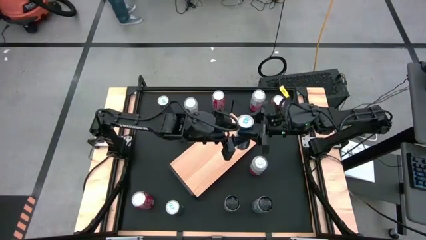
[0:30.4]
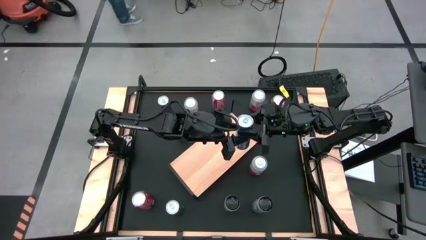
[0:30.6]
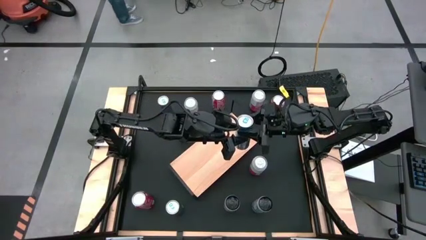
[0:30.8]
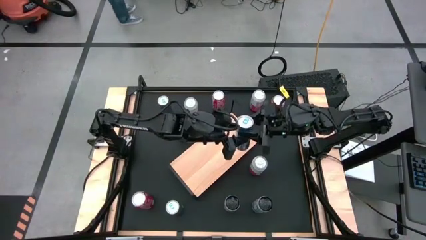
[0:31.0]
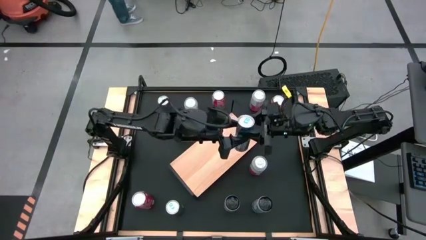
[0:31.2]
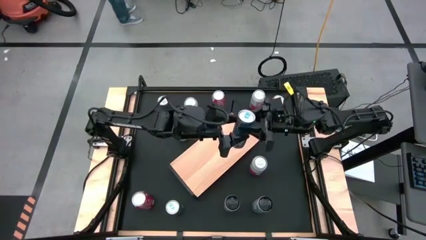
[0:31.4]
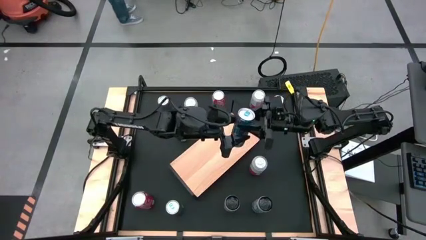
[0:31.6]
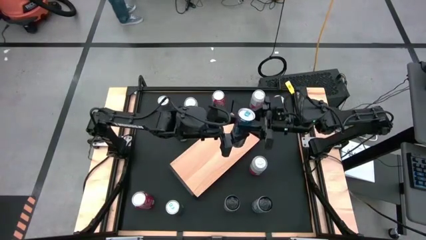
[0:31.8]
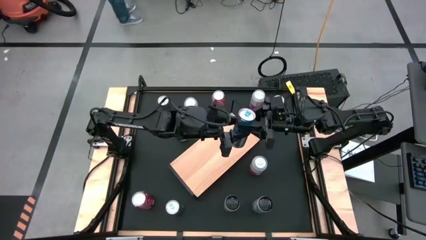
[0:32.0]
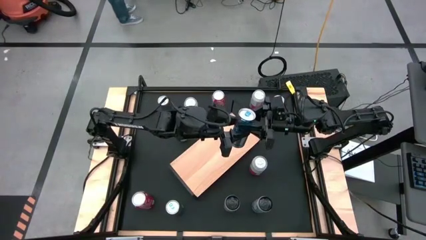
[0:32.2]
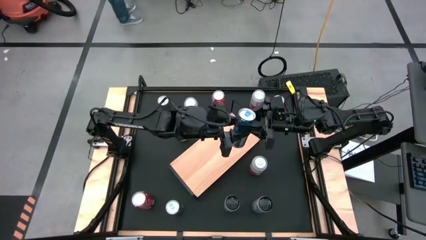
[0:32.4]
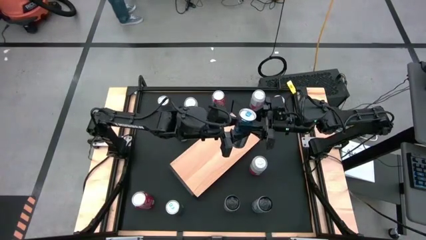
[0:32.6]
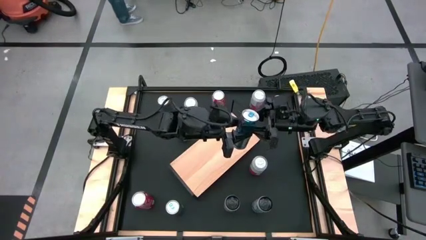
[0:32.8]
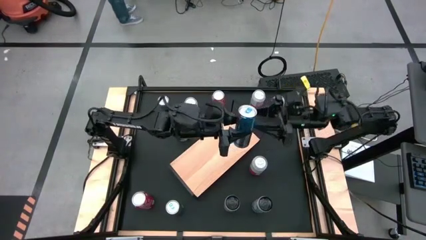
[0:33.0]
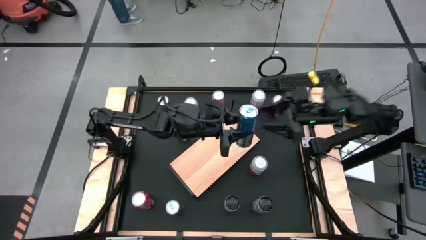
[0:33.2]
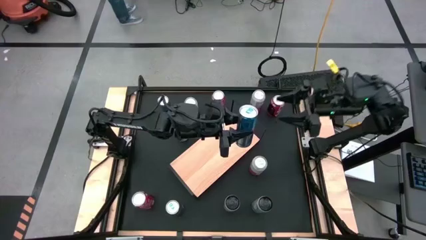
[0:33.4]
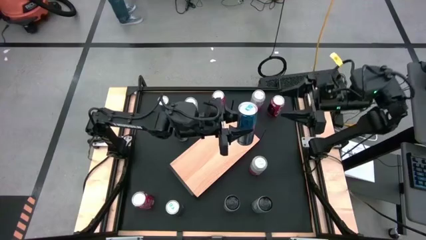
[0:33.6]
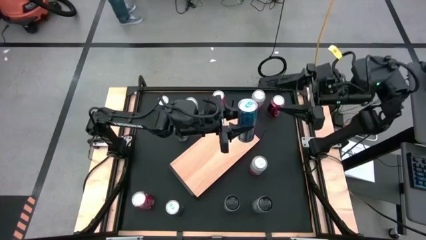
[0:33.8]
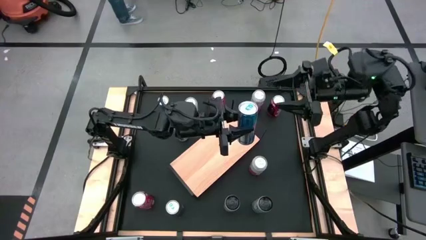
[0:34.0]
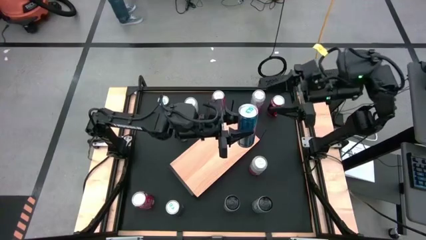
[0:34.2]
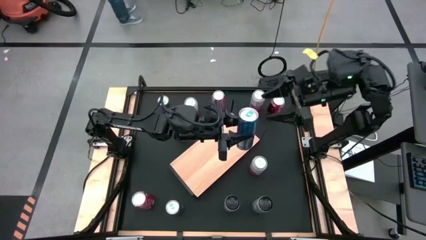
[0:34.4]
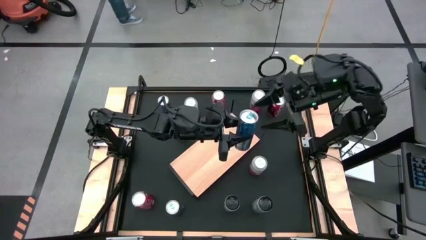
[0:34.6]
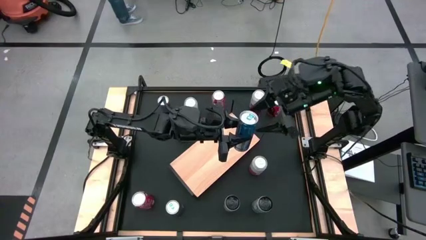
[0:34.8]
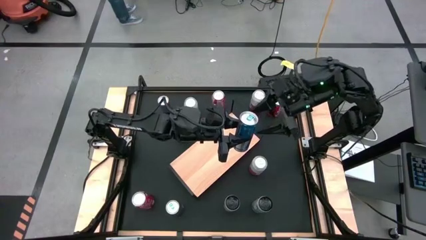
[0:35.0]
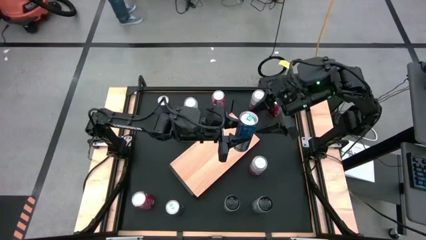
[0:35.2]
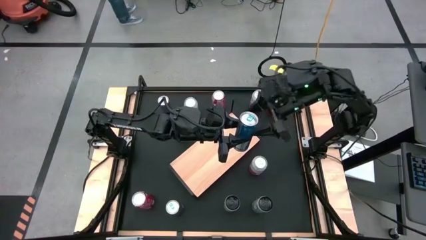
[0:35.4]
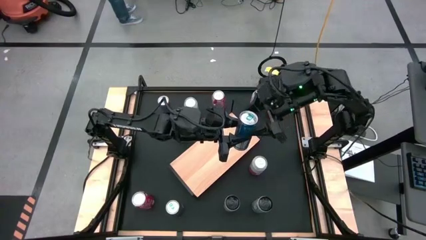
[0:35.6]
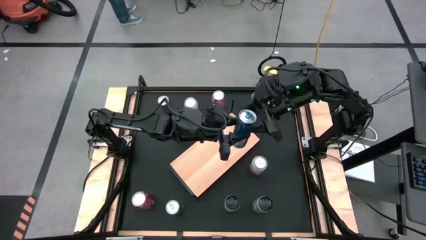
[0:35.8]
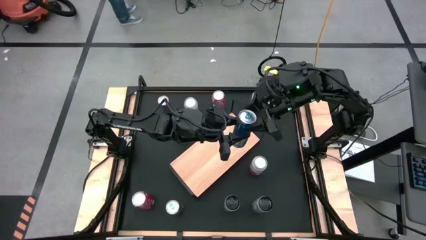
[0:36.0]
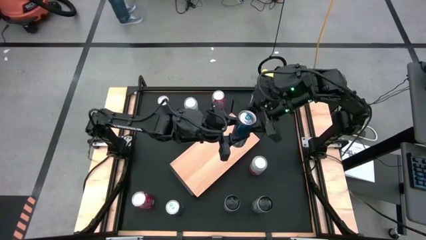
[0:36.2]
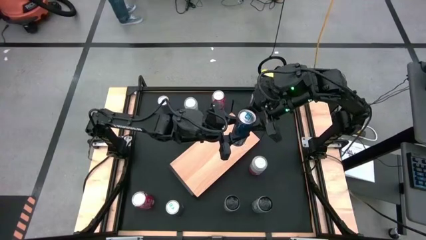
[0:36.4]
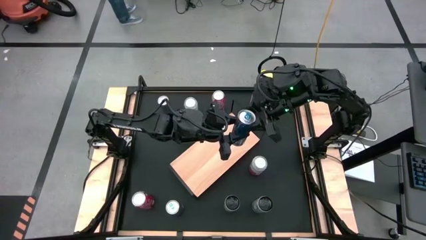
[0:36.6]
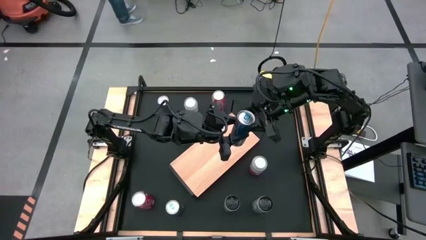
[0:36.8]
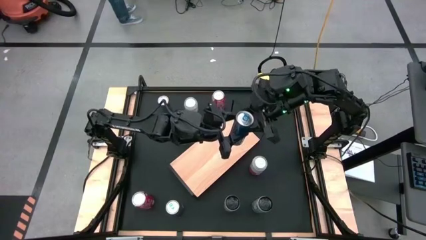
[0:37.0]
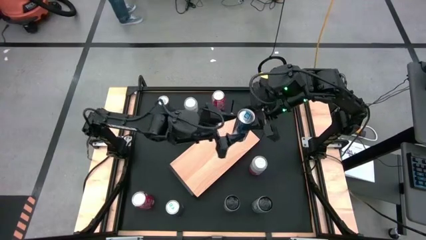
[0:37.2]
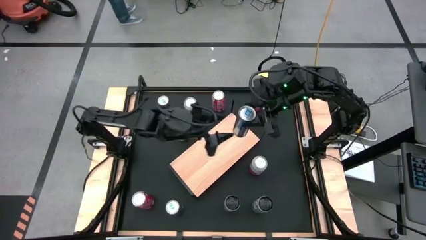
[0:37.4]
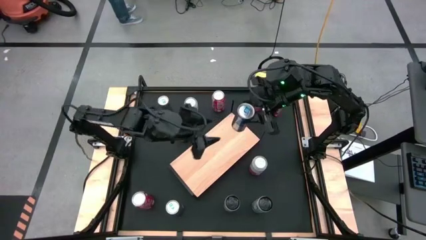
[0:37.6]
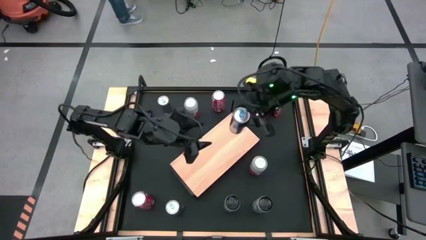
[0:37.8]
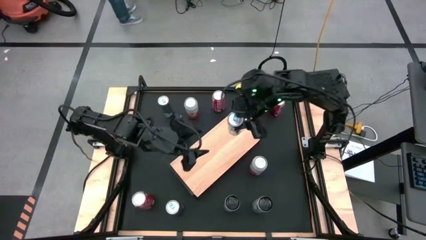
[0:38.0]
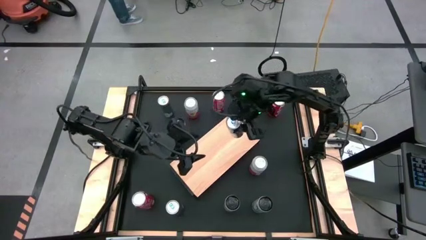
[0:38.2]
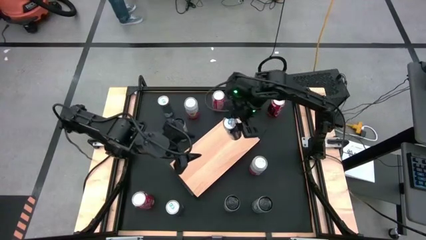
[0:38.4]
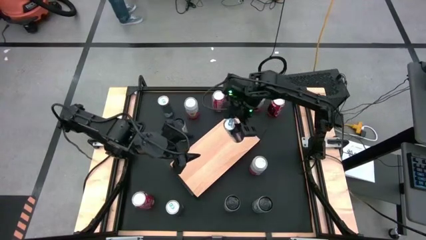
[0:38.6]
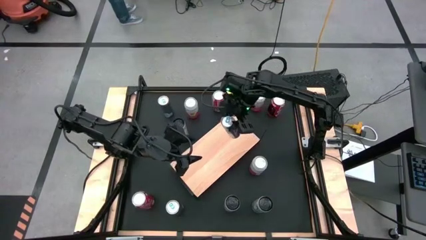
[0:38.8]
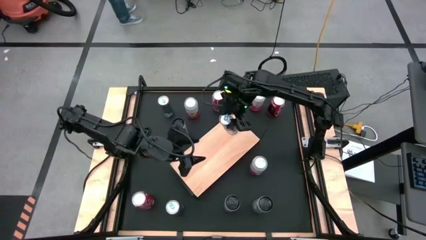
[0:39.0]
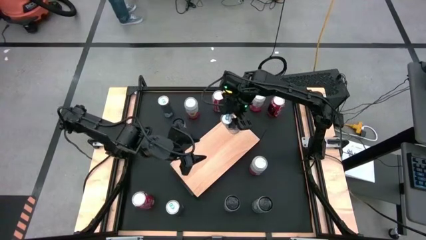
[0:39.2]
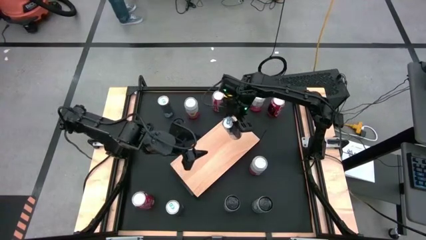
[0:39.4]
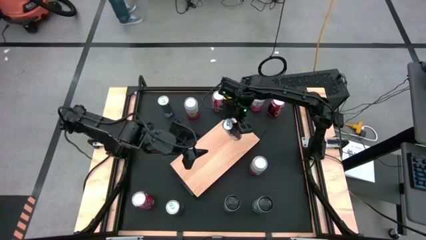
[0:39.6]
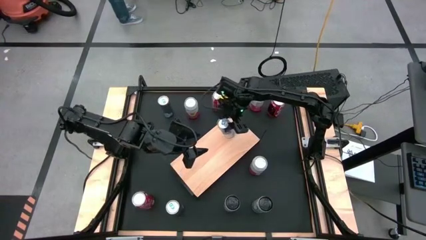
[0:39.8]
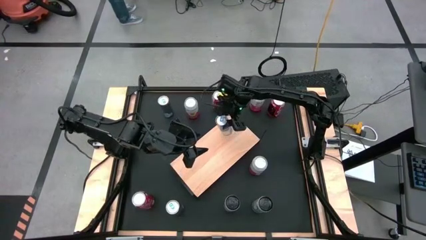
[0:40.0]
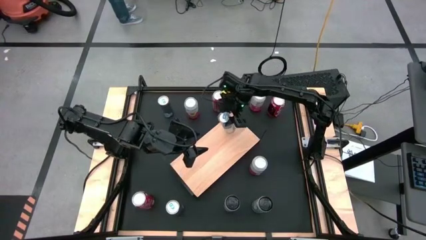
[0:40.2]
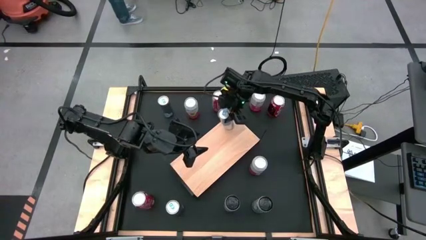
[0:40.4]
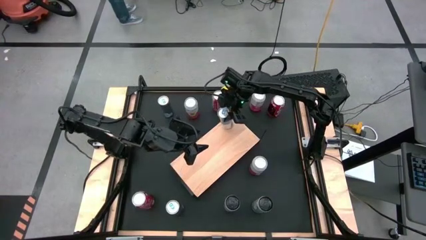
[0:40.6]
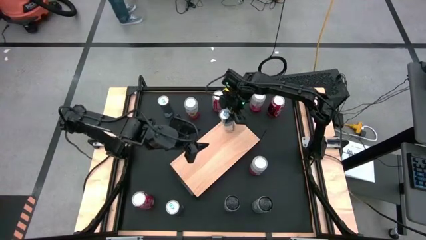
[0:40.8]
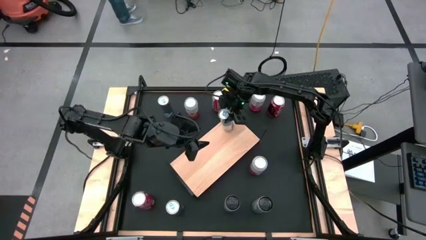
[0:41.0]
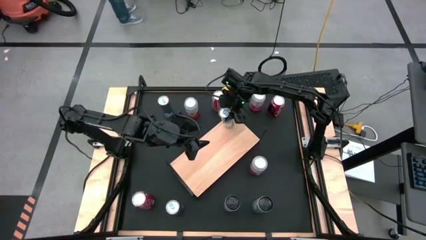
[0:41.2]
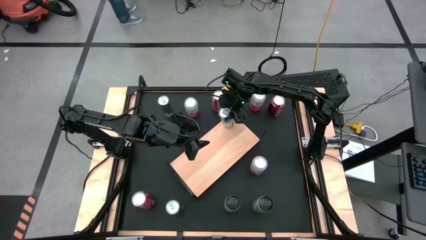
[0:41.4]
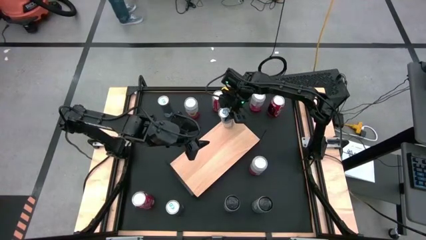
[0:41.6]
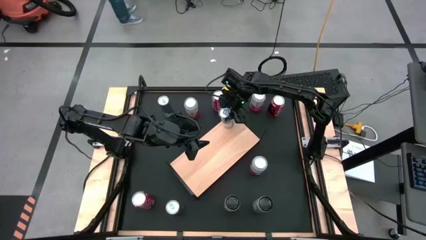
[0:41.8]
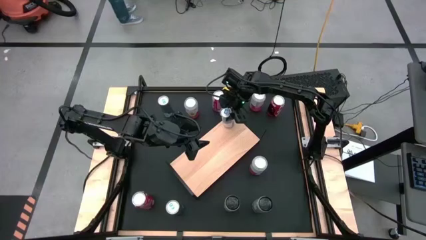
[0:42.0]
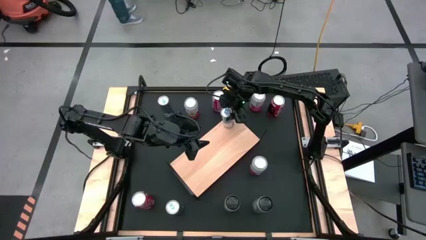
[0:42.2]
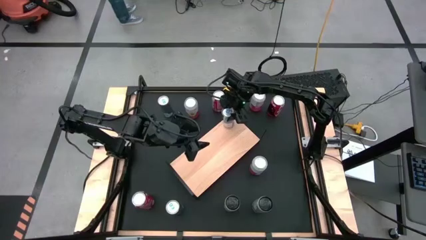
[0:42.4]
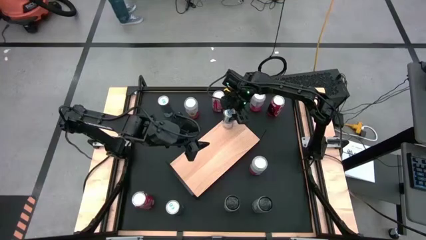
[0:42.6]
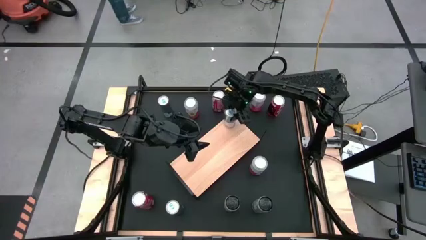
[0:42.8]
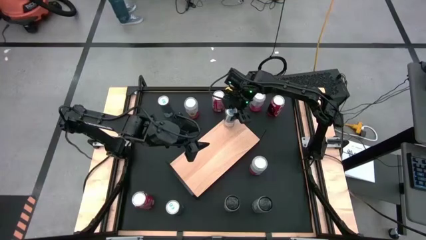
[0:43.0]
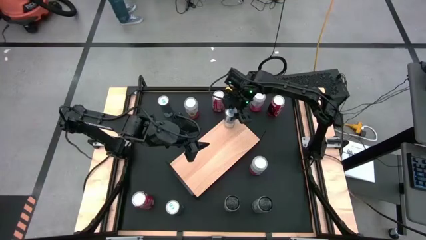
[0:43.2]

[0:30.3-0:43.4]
Task: Place canned beverage on shelf
Put the bottom right blue soda can on the shelf
